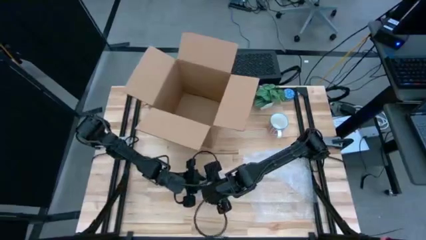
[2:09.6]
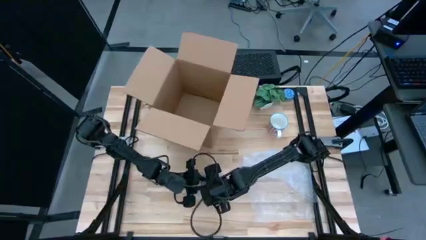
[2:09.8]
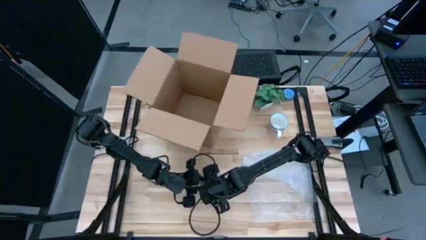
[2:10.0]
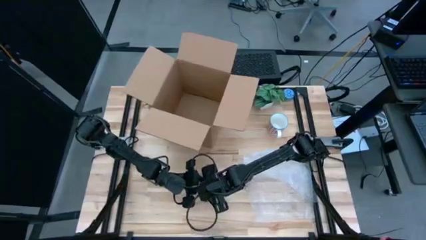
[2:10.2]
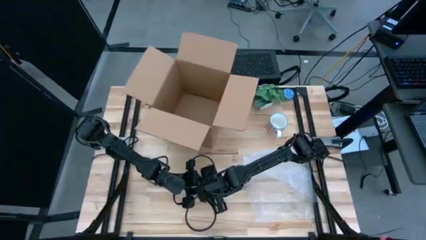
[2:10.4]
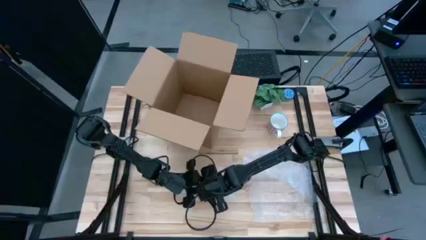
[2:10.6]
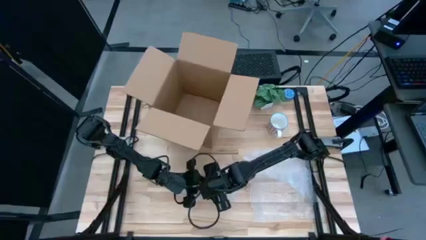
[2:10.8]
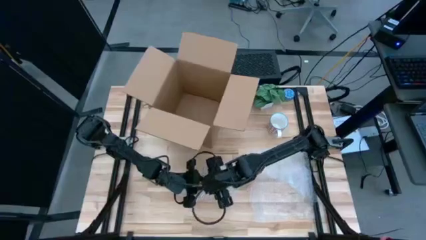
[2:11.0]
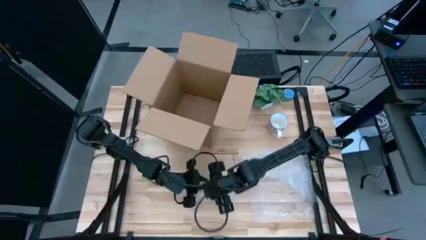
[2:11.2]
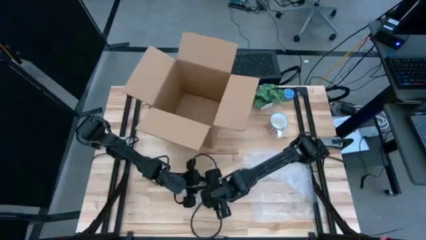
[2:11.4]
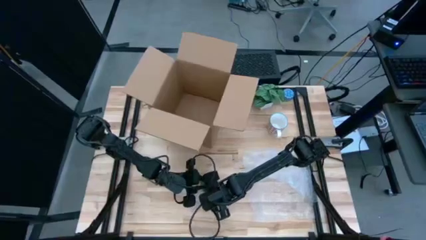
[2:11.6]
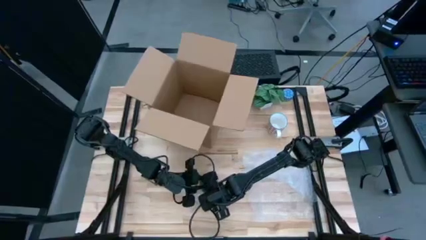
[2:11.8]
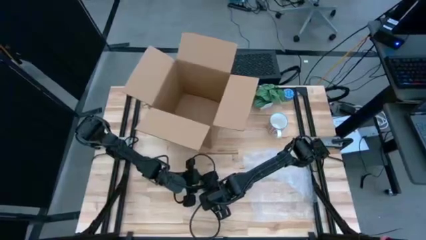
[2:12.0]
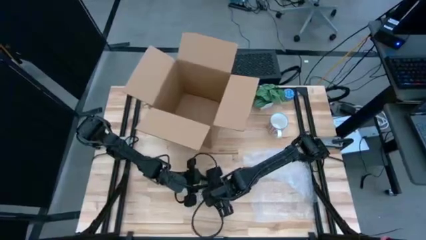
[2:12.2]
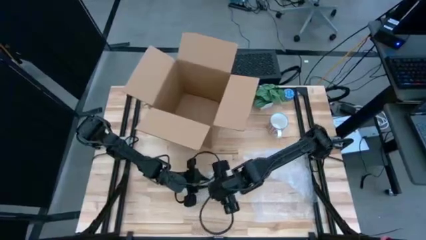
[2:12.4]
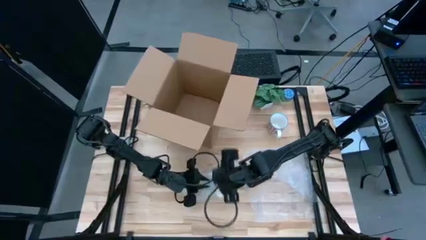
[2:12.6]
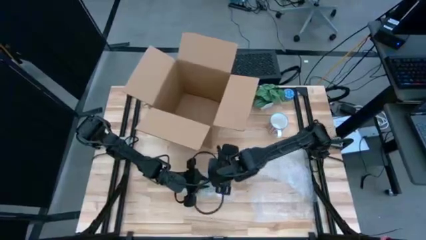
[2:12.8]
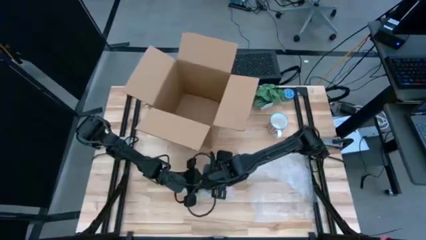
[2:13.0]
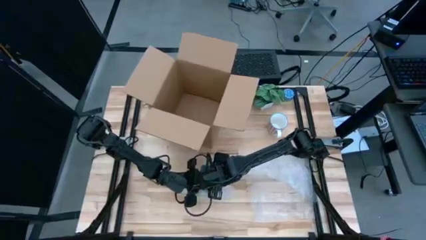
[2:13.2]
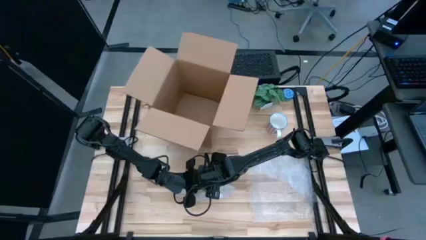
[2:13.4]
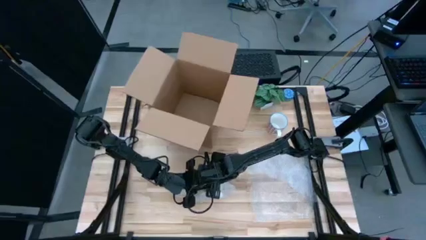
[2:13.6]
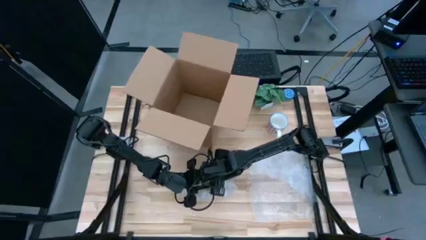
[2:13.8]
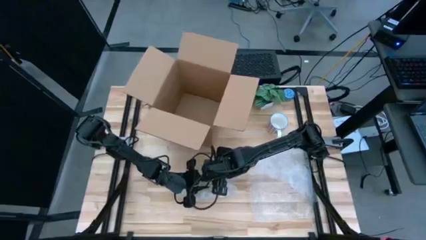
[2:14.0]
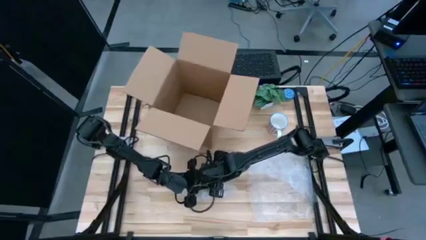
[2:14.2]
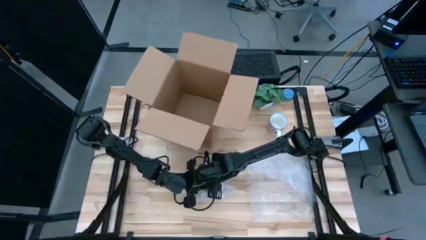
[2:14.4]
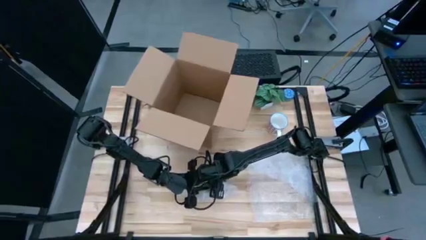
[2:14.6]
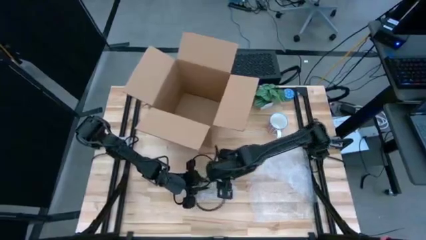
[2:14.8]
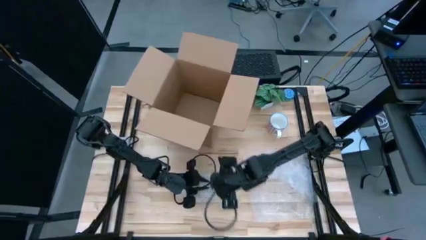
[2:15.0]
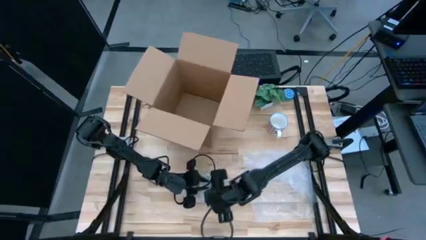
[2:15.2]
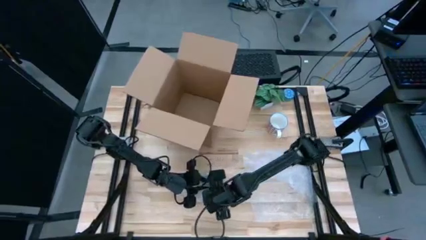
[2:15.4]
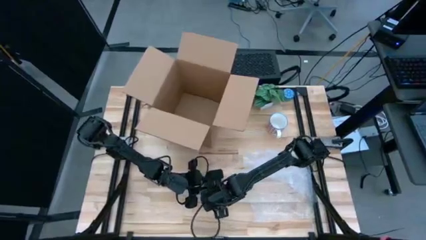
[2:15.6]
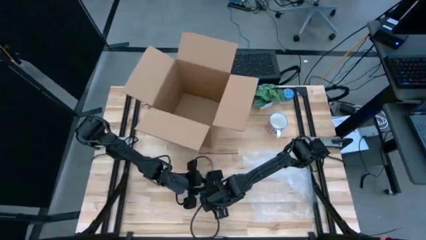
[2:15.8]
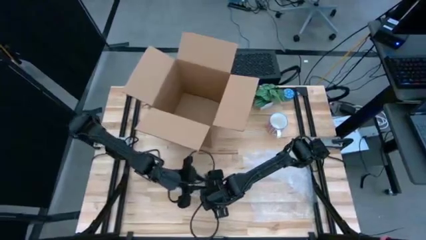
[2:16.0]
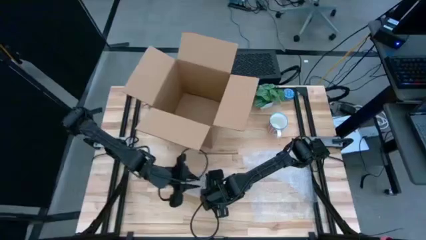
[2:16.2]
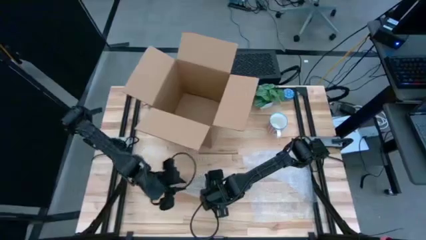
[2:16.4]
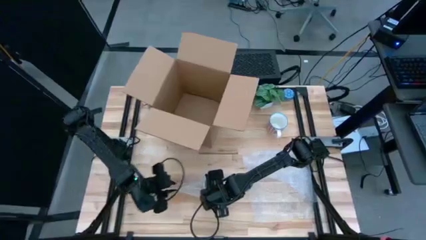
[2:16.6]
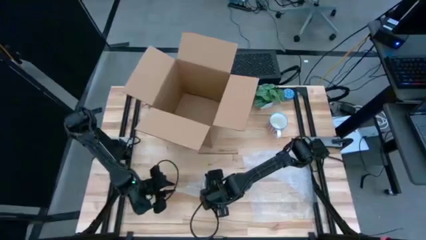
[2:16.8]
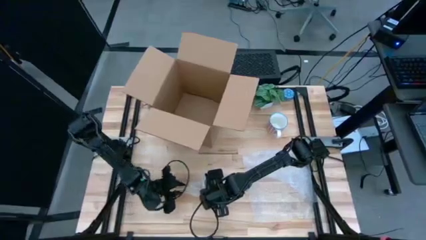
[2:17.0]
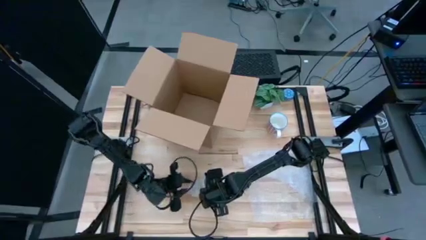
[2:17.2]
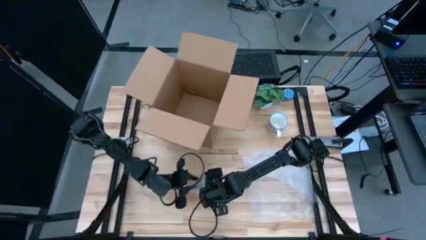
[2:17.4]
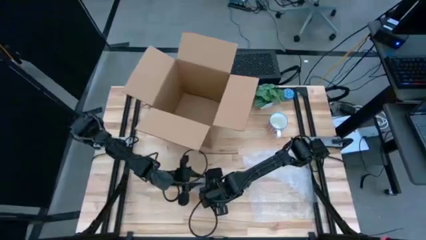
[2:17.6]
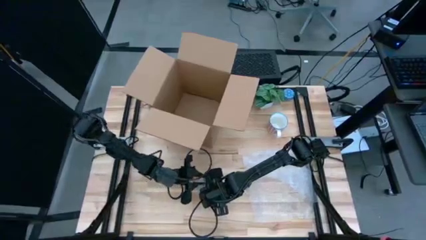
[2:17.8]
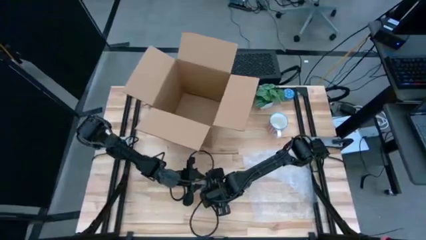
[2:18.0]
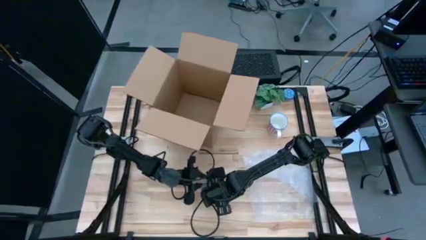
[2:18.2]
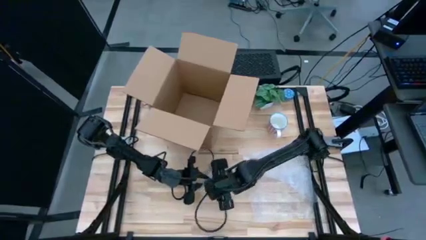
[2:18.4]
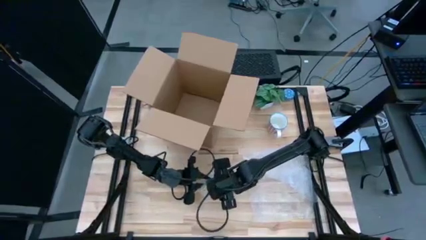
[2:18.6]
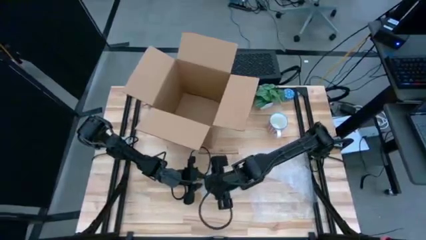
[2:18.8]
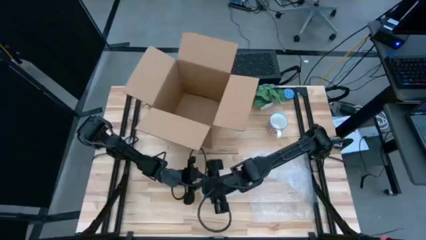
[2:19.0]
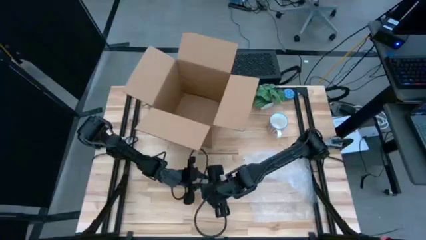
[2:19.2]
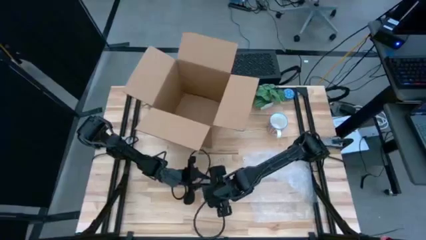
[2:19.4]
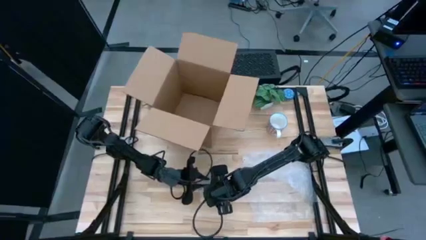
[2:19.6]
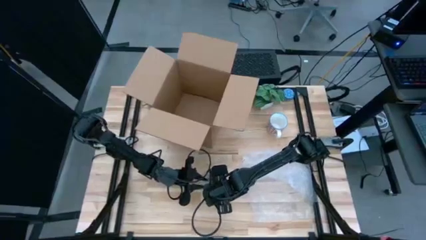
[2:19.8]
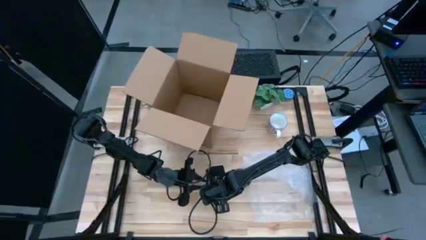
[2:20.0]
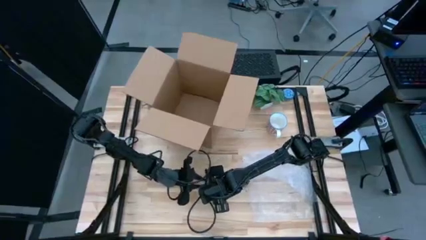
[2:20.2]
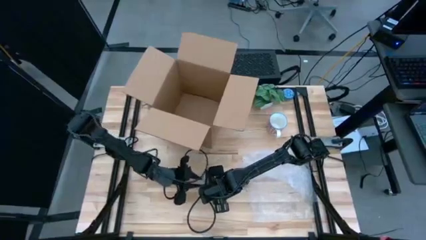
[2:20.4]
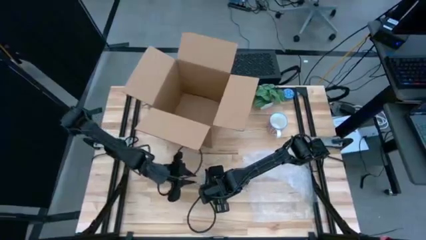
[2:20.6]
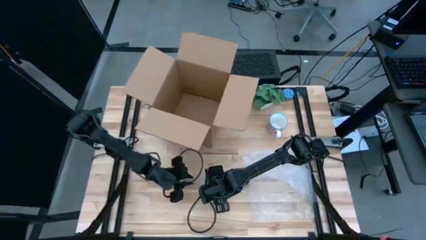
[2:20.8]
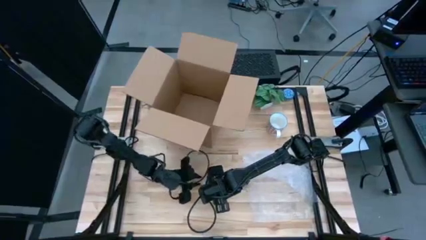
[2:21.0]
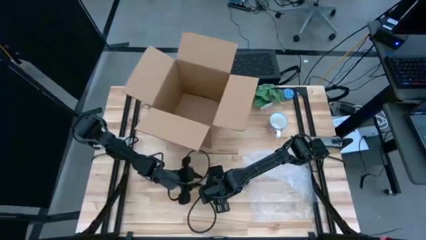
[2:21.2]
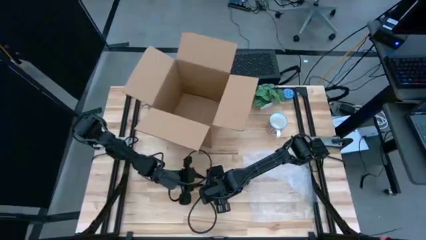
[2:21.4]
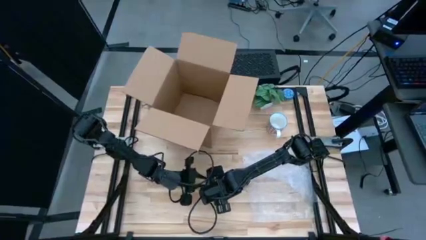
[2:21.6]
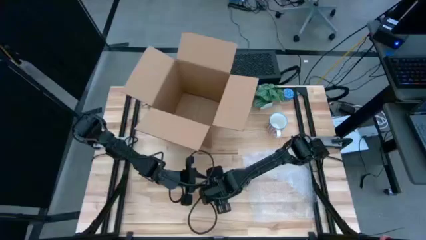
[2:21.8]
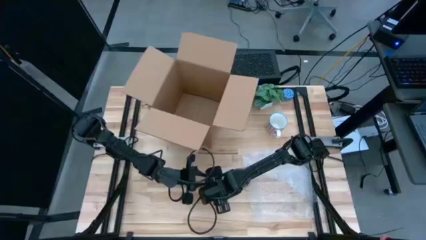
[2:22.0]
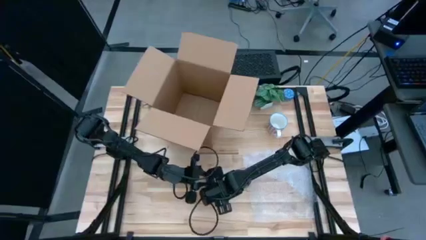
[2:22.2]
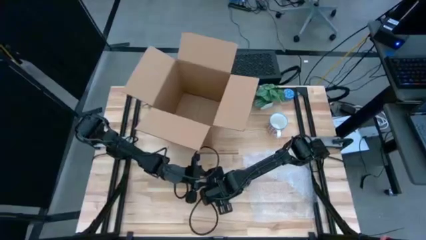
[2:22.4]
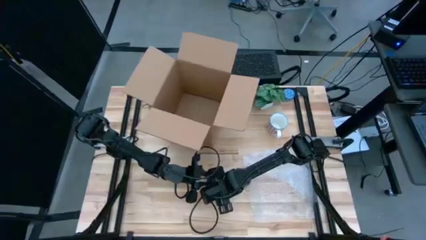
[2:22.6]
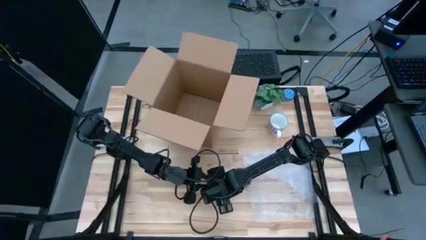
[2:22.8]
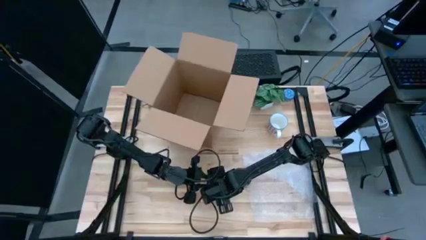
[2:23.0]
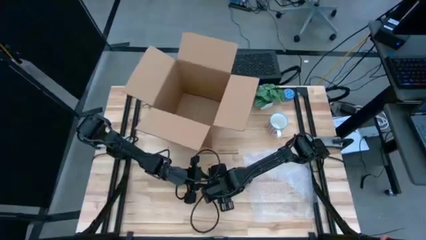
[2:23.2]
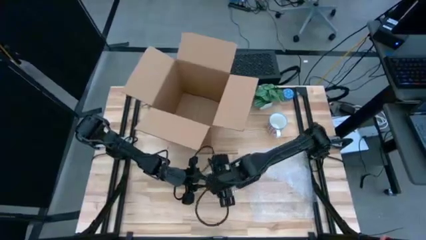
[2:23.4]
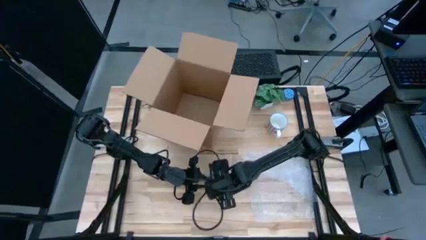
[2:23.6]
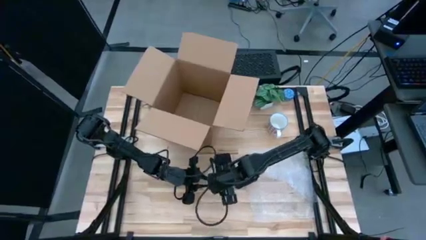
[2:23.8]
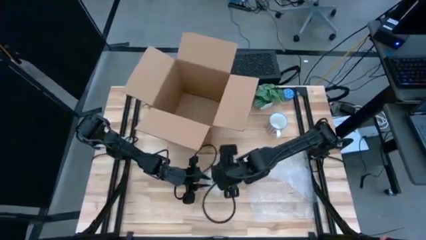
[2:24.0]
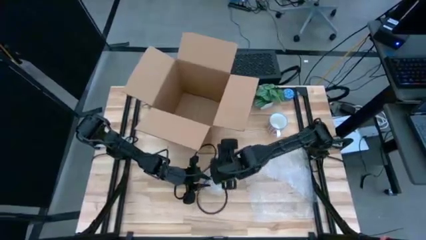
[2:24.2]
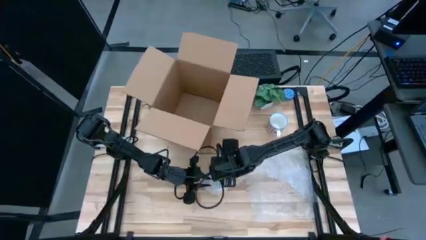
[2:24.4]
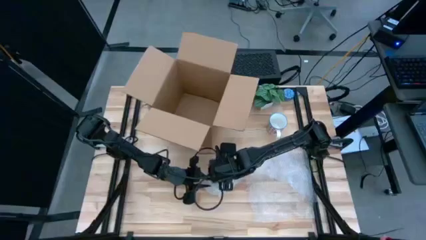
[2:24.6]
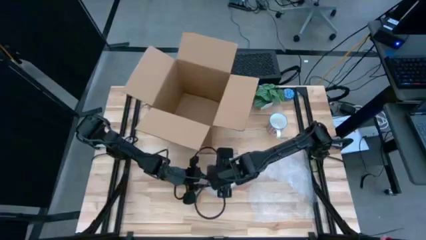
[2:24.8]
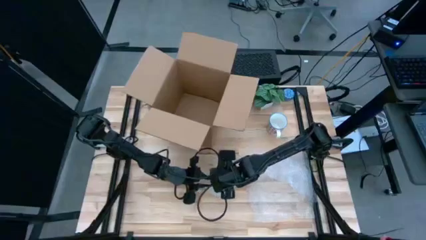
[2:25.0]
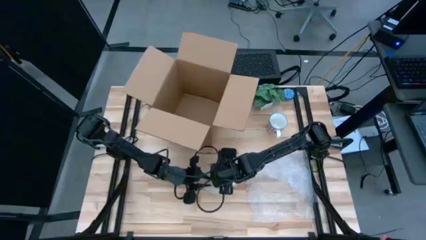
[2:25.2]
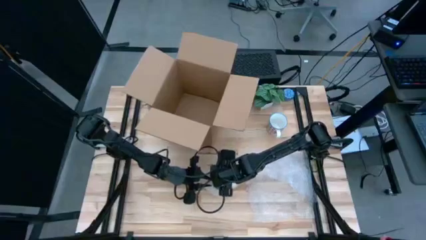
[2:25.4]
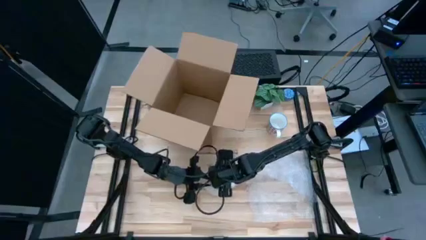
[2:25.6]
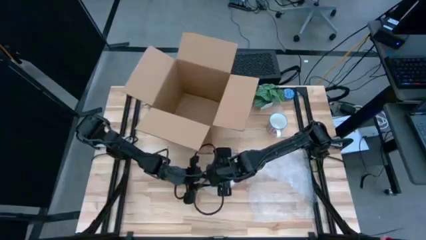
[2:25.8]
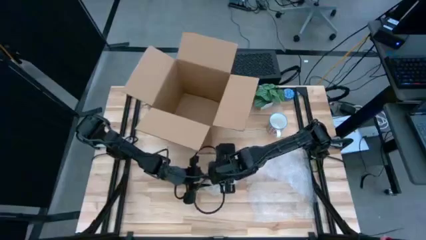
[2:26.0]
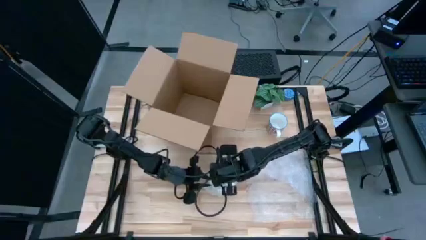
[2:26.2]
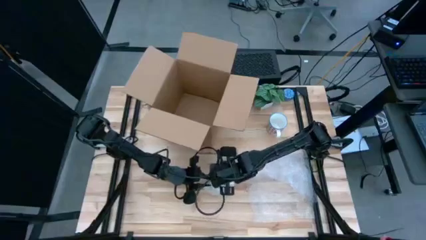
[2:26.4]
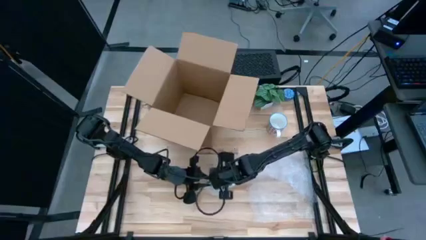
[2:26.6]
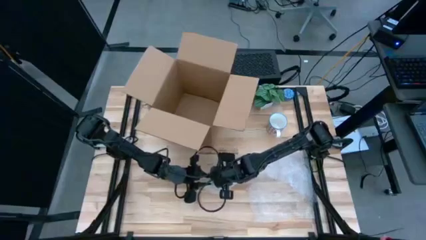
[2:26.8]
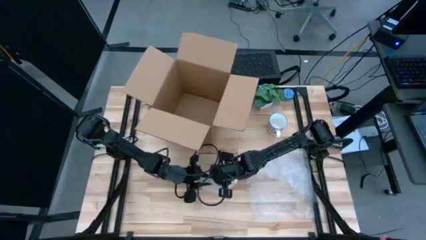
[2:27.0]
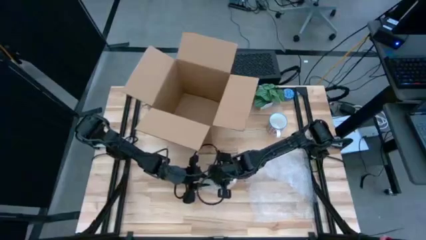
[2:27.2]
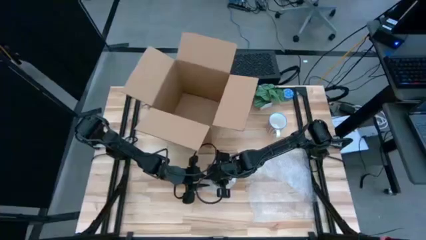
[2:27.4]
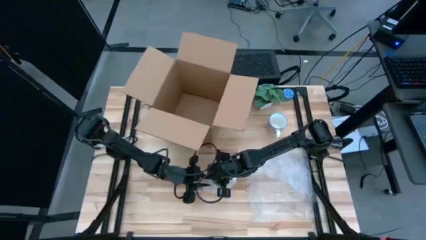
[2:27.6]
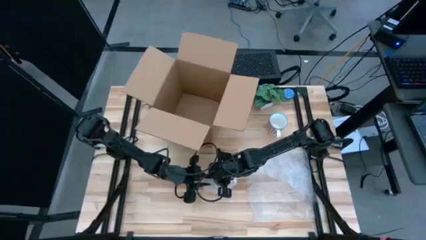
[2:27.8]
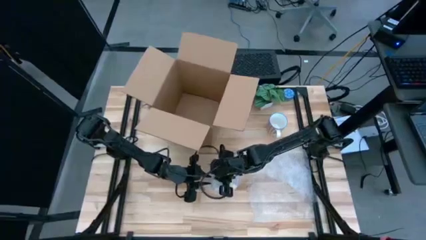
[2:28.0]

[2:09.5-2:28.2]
Task: wrap mug
Wrap the yellow mug with bubble wrap
